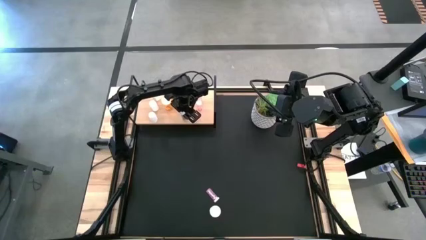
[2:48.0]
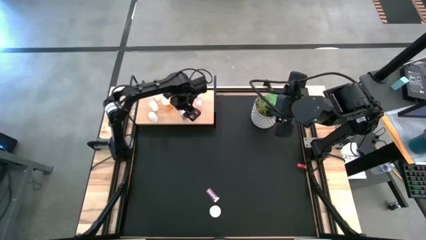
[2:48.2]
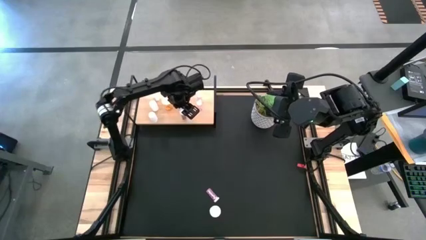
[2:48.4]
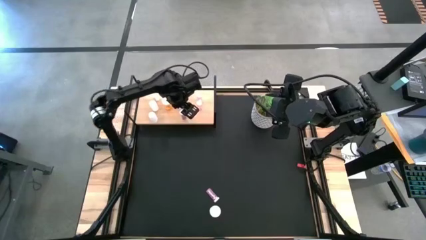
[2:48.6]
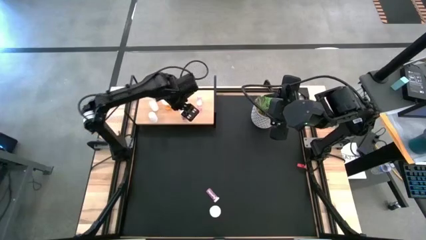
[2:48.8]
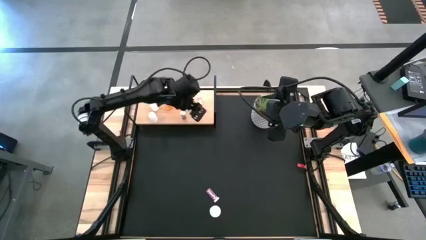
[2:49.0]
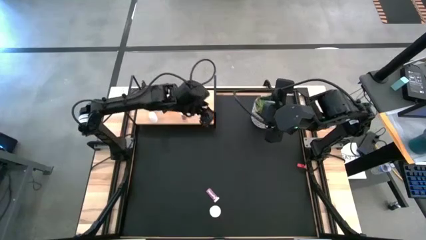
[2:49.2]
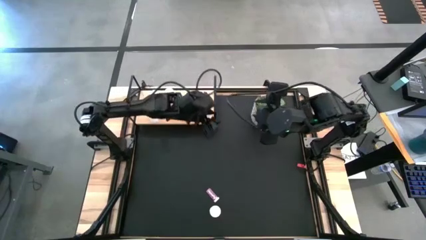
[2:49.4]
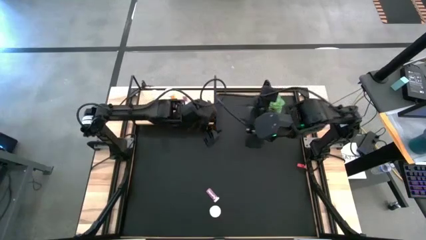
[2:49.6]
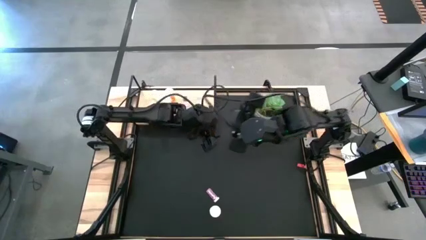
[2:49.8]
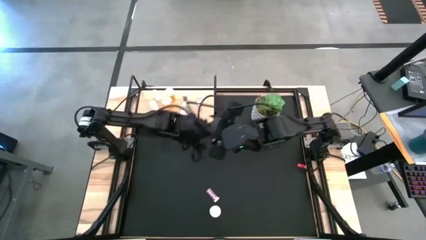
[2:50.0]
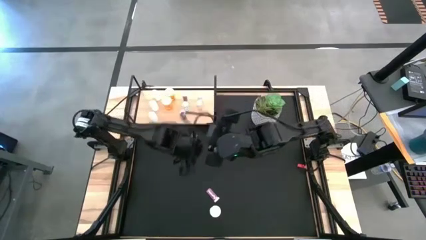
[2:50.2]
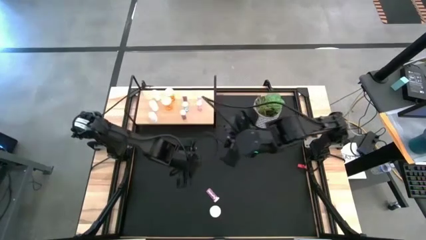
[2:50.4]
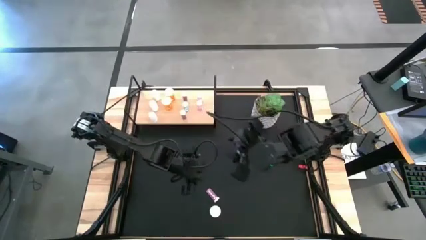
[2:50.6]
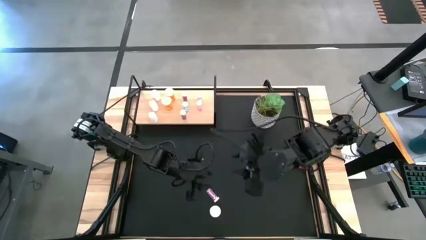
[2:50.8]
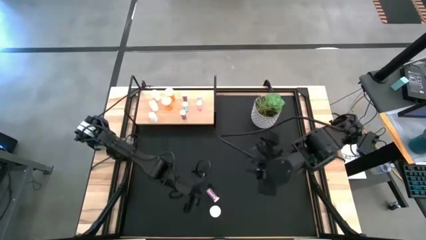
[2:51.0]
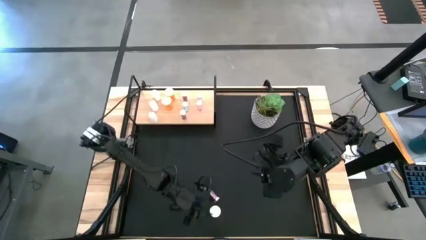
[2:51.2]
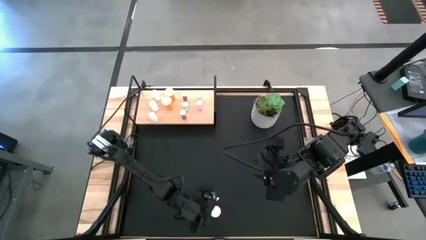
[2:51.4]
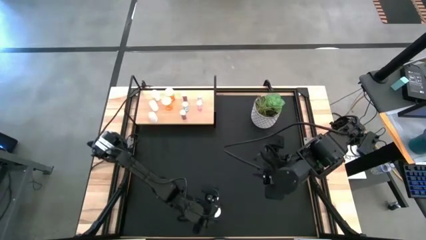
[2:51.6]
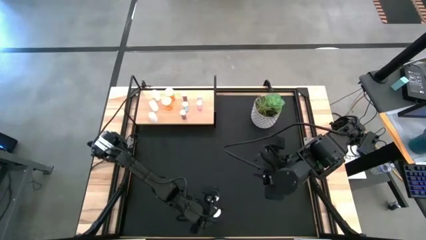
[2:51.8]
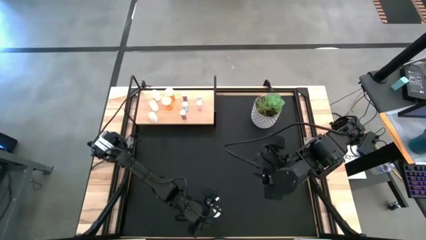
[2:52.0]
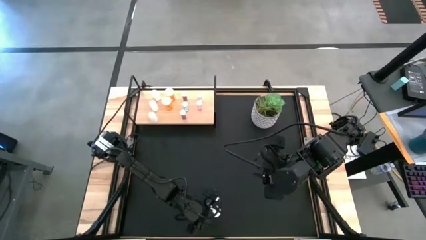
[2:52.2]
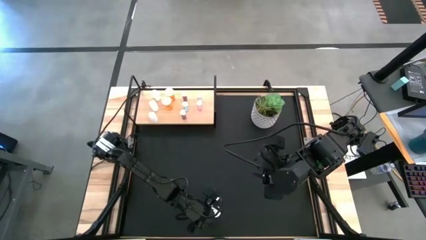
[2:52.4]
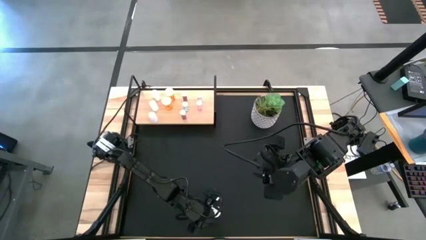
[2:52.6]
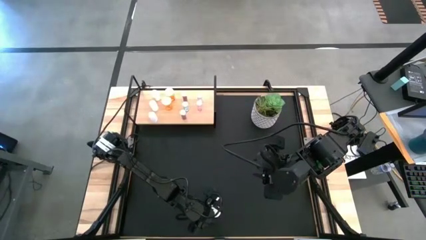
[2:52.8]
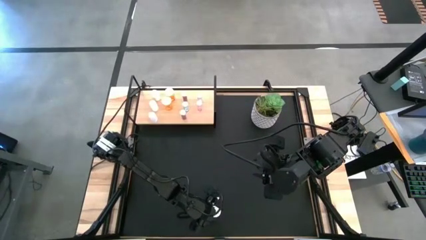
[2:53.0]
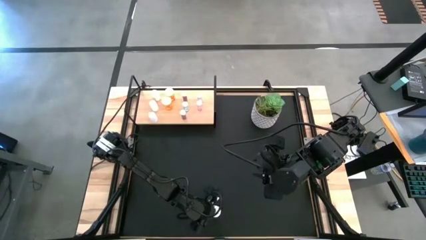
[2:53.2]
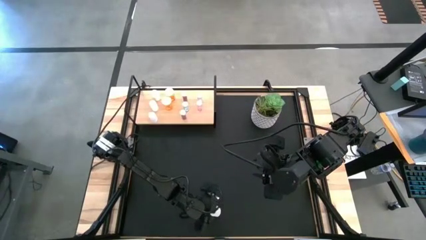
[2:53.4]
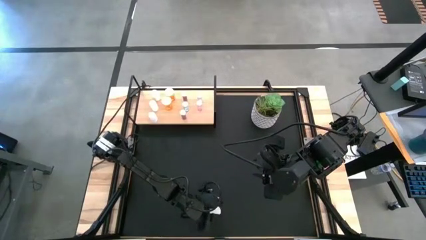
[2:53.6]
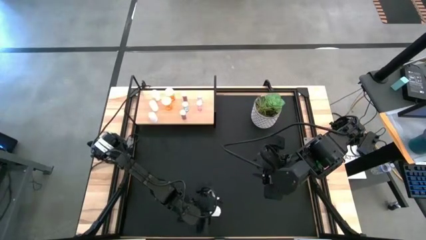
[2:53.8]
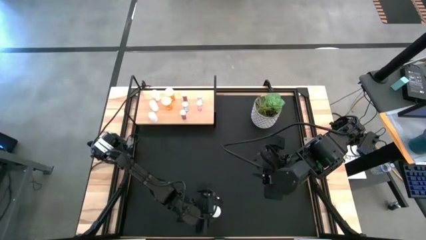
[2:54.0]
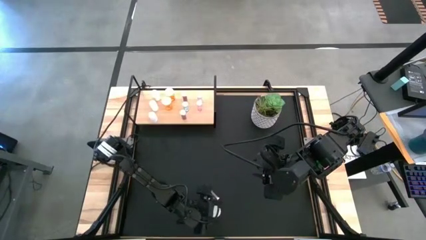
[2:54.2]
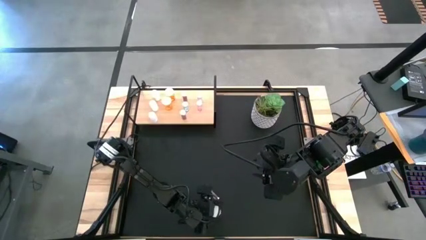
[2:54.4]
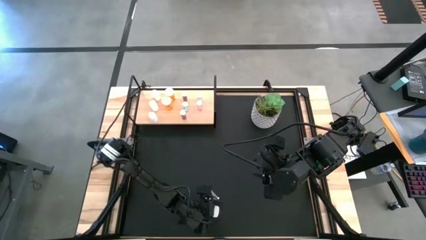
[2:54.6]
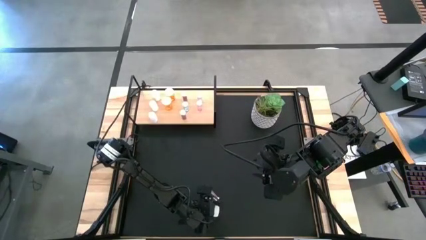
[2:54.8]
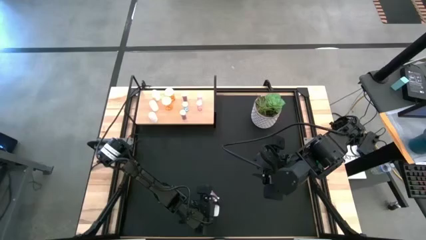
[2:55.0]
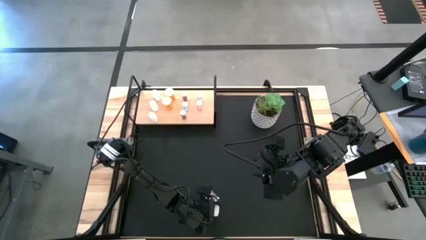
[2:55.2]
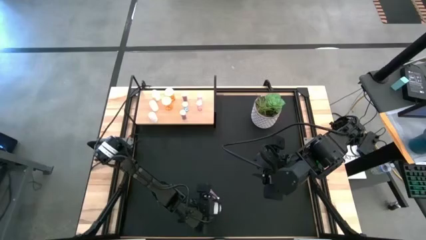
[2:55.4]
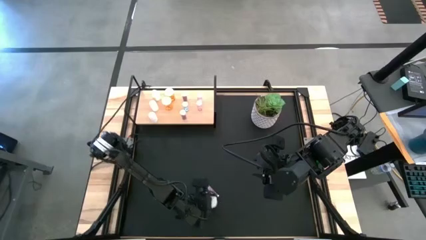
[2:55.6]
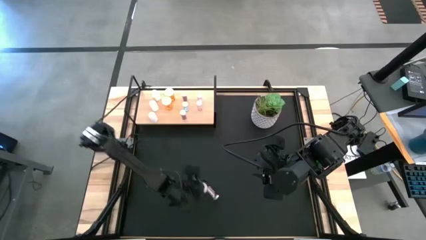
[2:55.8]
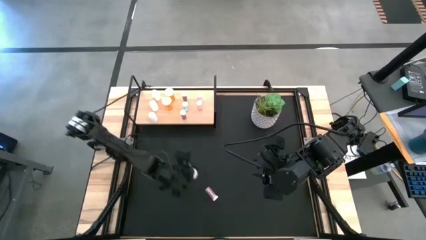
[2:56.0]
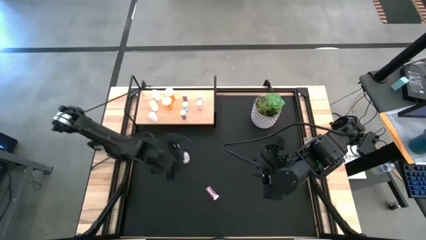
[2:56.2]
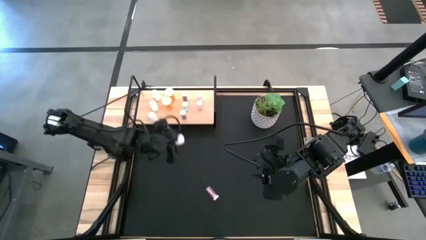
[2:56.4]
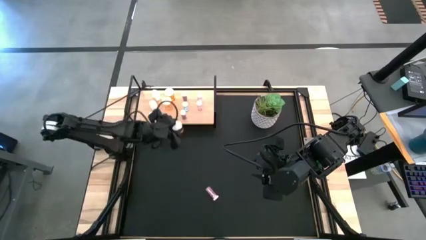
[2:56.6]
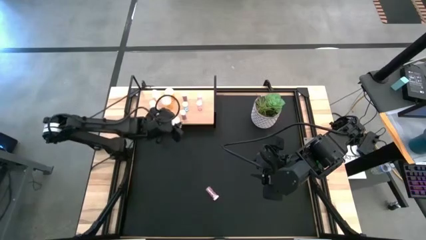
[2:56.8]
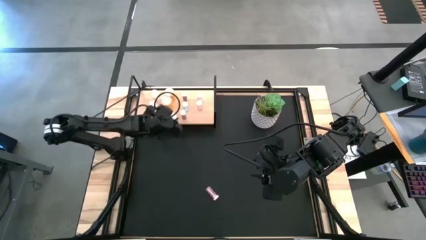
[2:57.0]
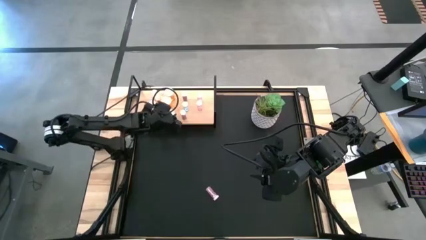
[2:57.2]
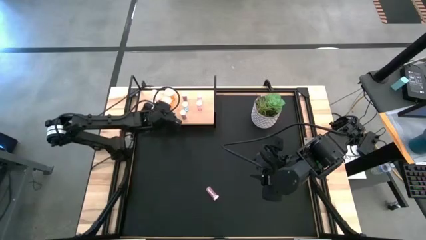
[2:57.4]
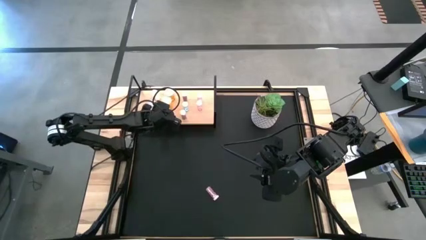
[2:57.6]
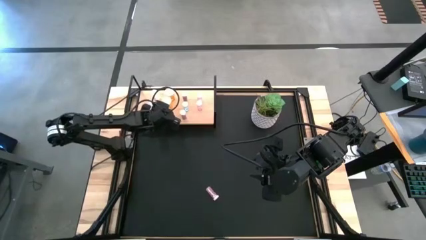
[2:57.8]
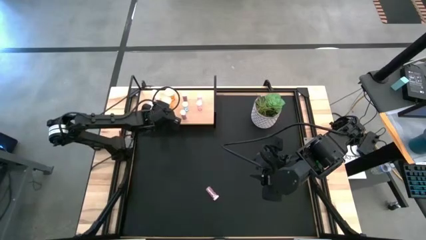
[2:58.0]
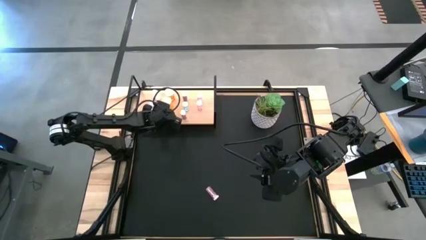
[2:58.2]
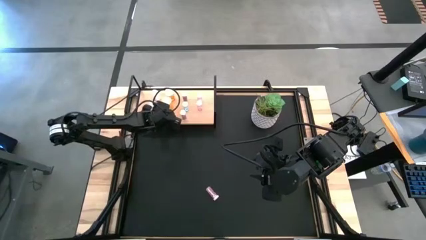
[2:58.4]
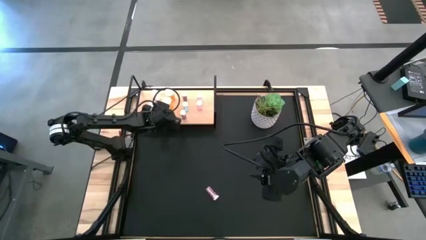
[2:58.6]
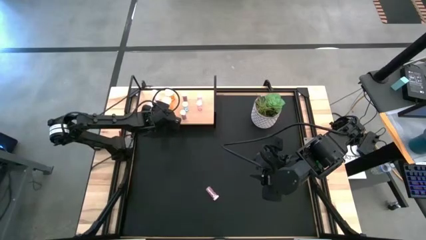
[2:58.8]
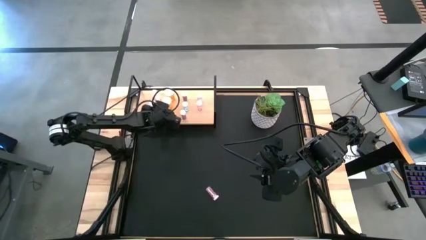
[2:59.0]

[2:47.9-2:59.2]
Task: Pick and place medicine bottles onto shelf by color
Put the orange pill bottle on the shelf aligned with the other orange pill bottles

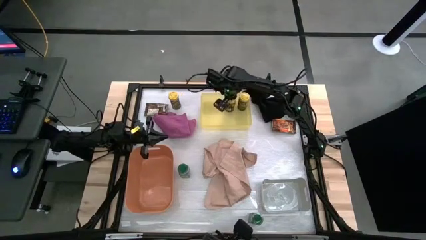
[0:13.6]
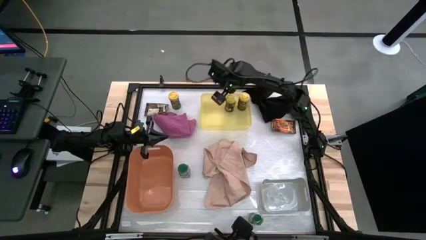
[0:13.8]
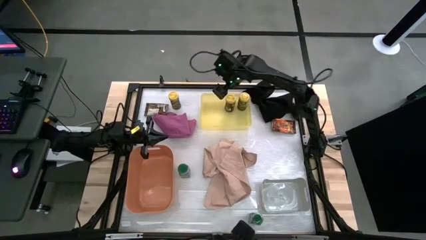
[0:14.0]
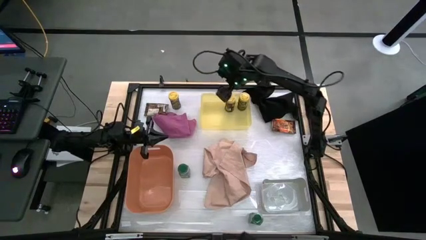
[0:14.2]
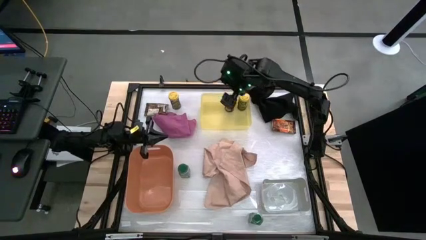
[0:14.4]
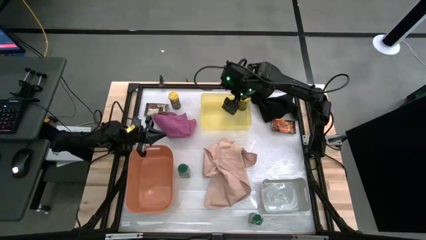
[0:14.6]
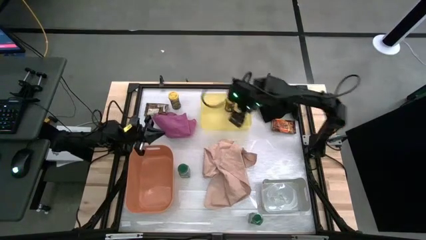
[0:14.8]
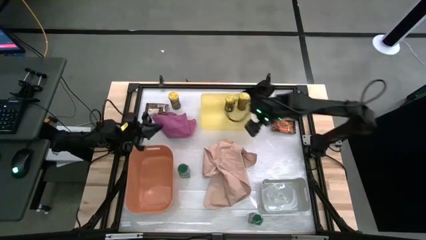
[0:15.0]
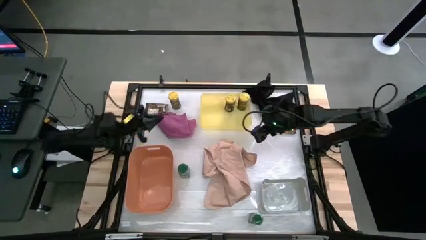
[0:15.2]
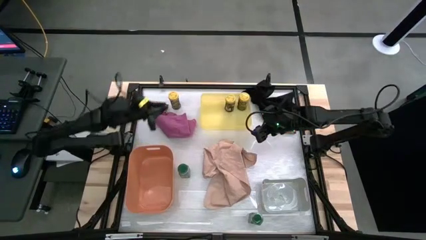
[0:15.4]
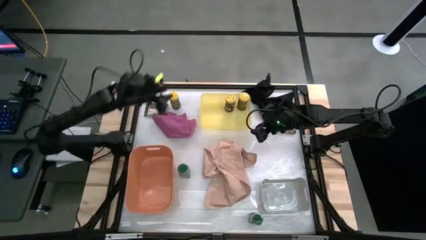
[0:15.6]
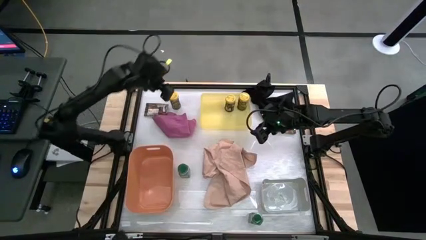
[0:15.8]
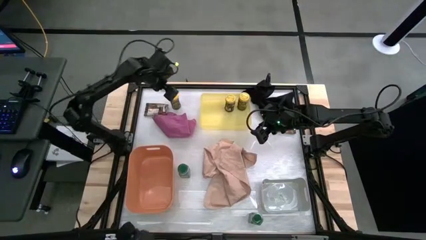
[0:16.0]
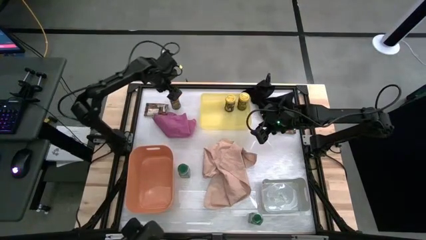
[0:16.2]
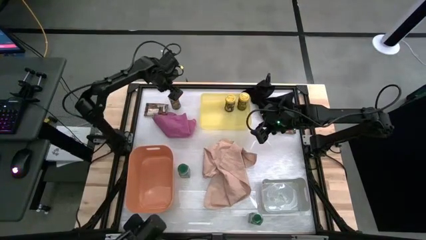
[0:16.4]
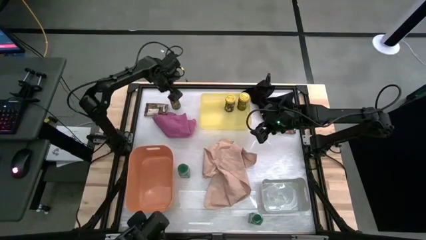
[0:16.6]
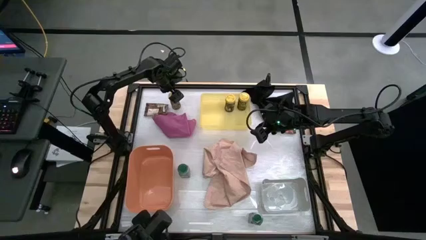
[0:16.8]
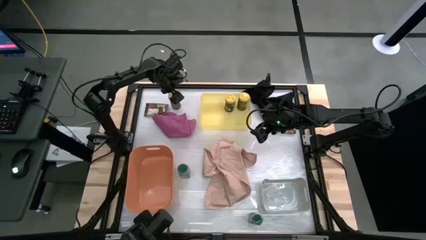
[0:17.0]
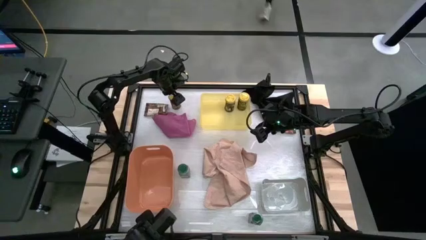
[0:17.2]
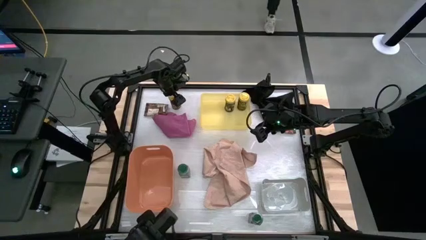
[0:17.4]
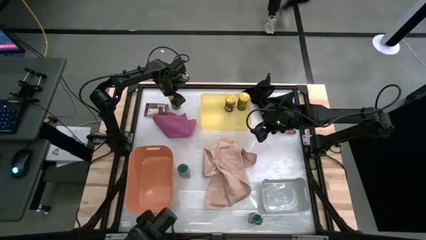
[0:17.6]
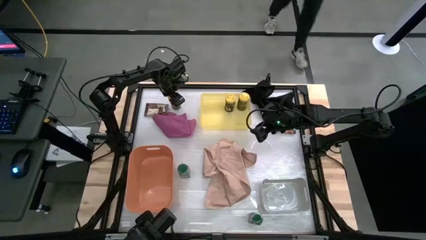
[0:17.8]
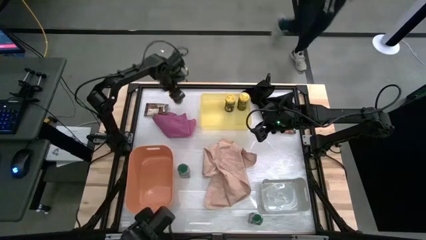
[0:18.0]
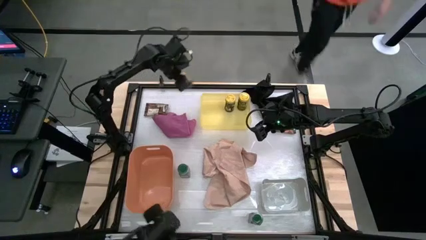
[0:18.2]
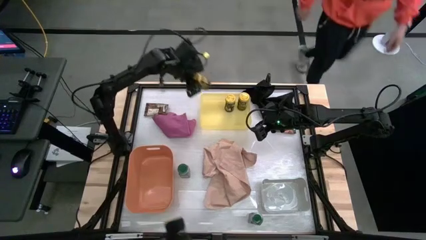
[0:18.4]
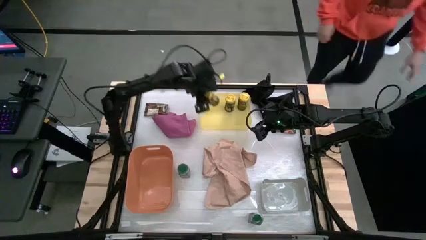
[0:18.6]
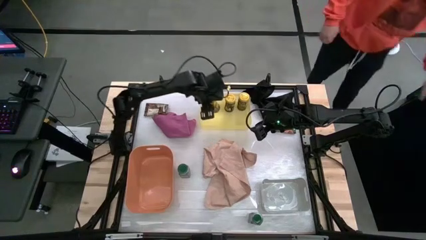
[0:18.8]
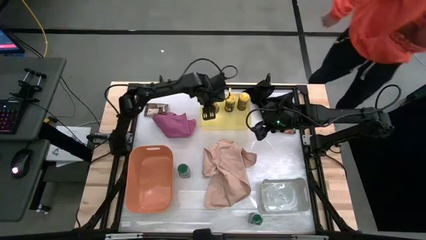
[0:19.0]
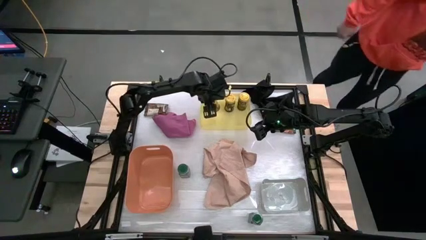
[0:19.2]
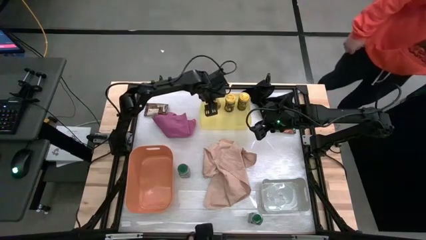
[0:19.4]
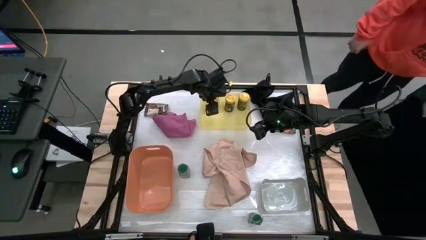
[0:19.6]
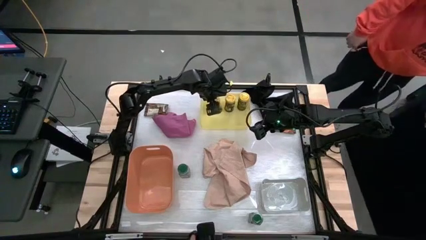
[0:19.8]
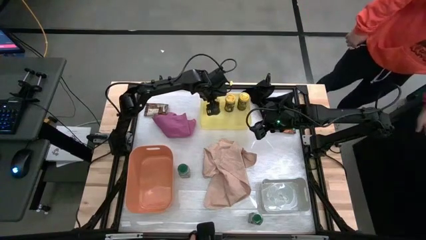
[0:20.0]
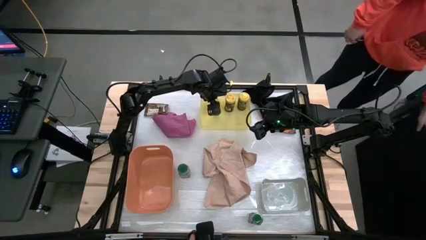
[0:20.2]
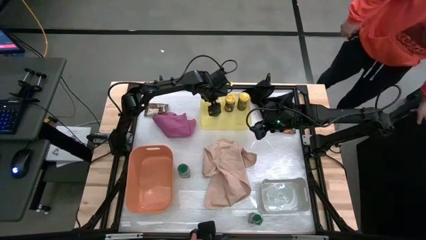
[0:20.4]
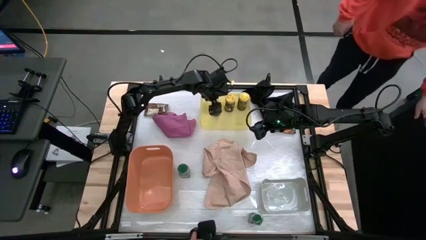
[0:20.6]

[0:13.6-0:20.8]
Task: Sort spices by type
Put the yellow spice bottle into the yellow bin
